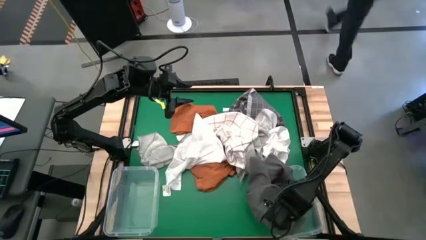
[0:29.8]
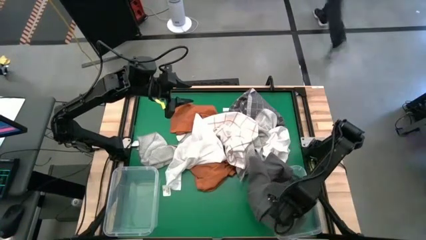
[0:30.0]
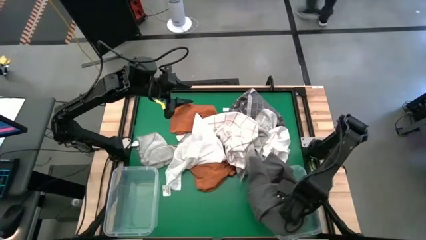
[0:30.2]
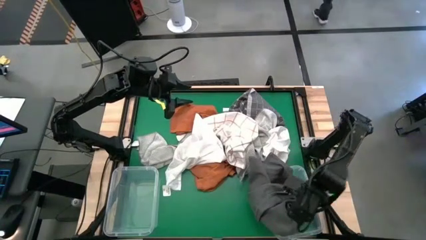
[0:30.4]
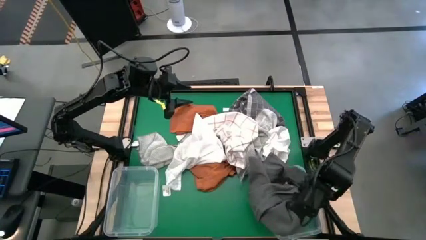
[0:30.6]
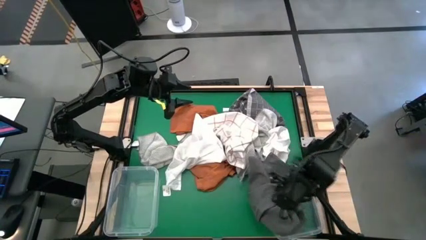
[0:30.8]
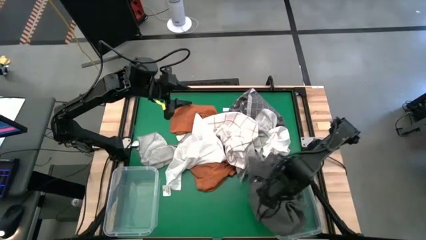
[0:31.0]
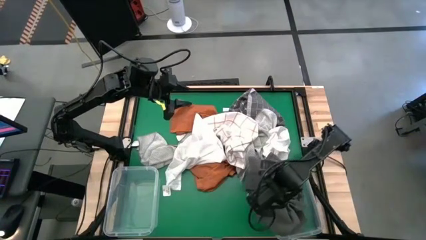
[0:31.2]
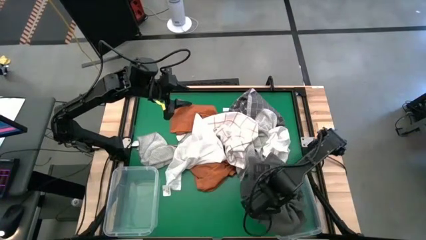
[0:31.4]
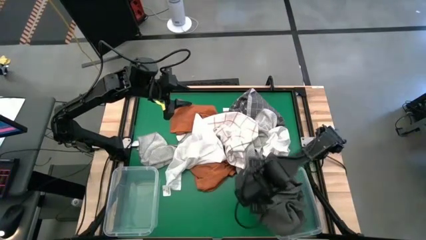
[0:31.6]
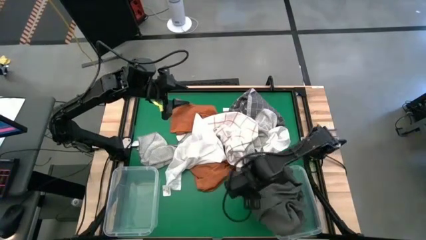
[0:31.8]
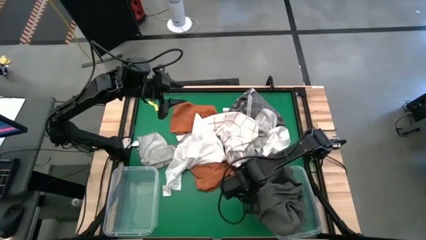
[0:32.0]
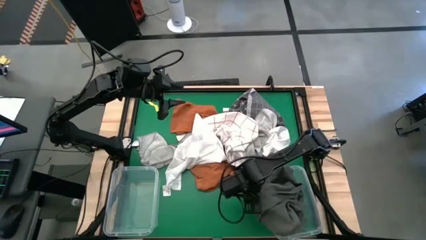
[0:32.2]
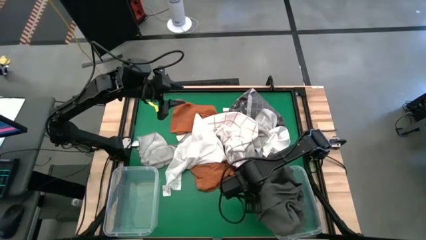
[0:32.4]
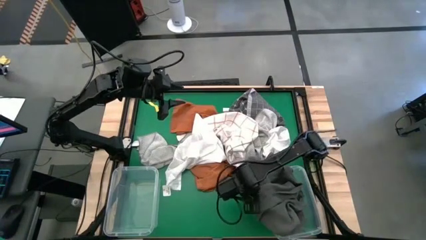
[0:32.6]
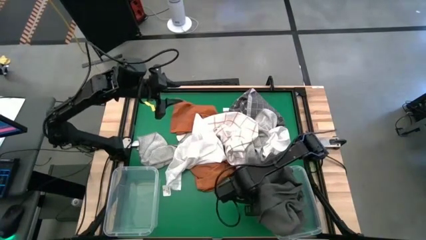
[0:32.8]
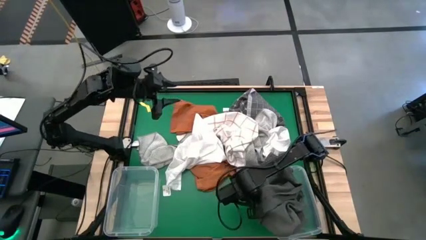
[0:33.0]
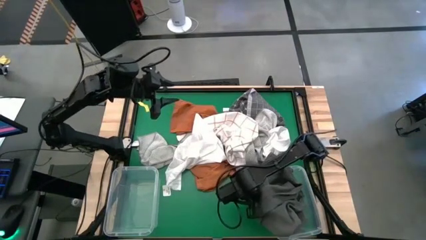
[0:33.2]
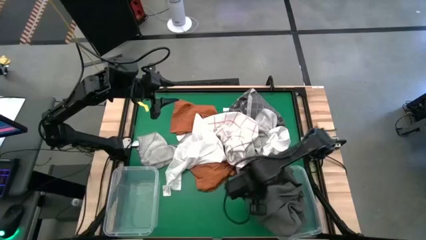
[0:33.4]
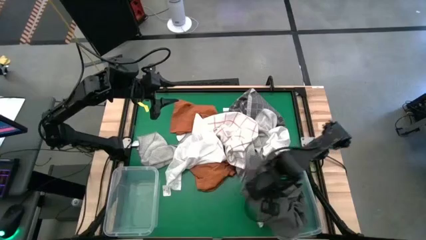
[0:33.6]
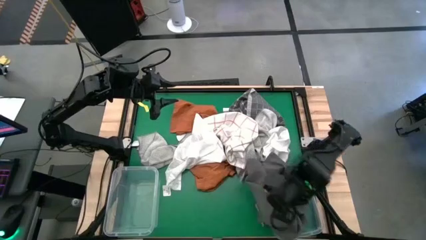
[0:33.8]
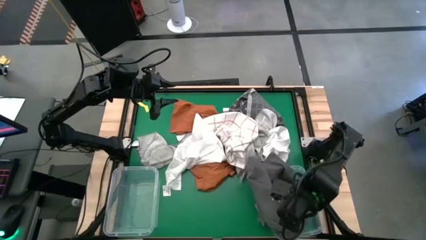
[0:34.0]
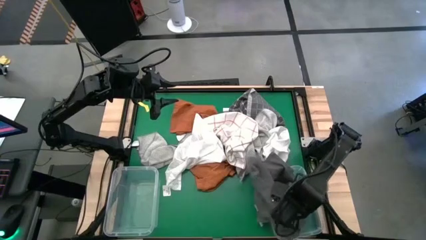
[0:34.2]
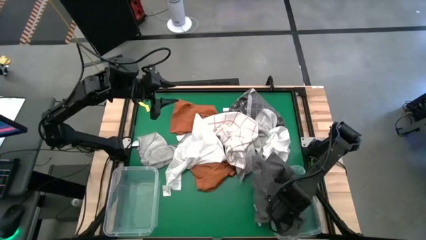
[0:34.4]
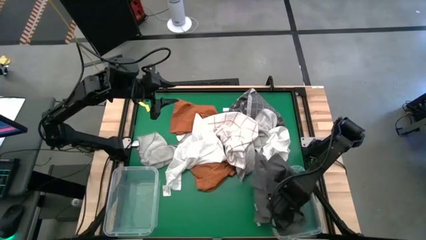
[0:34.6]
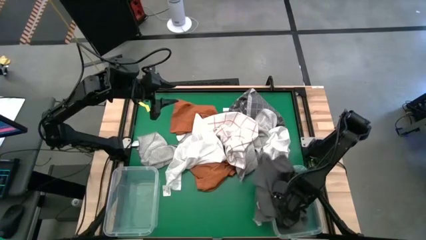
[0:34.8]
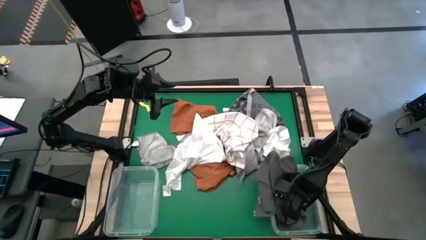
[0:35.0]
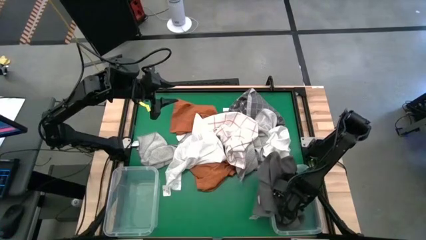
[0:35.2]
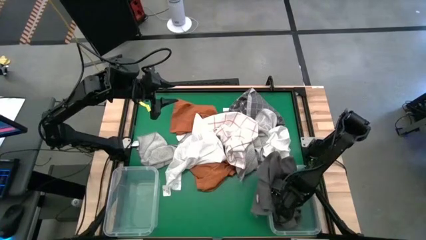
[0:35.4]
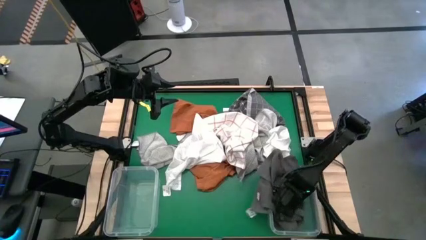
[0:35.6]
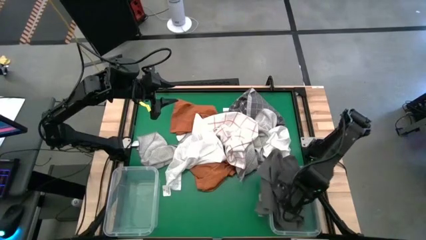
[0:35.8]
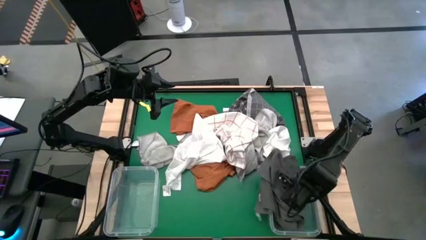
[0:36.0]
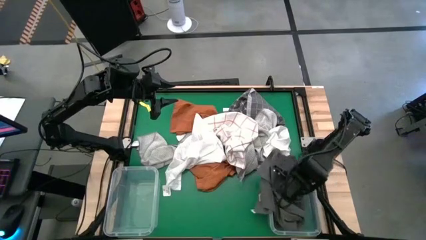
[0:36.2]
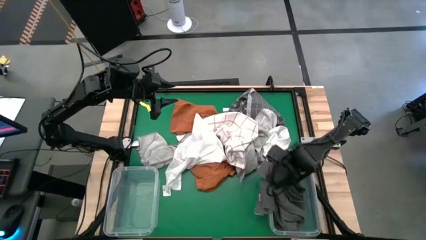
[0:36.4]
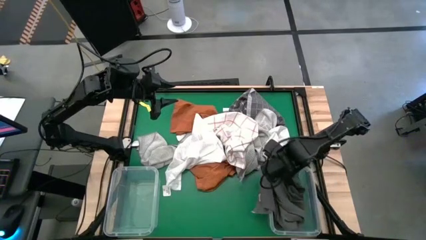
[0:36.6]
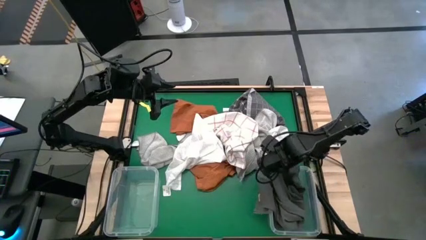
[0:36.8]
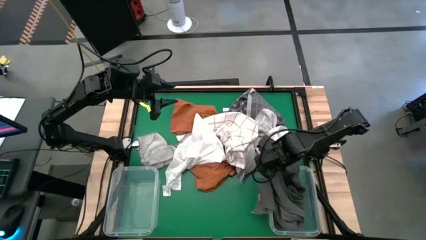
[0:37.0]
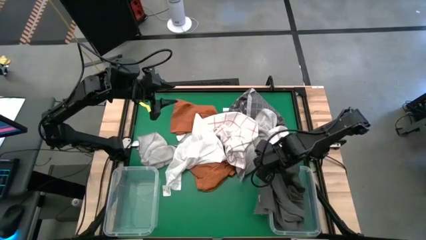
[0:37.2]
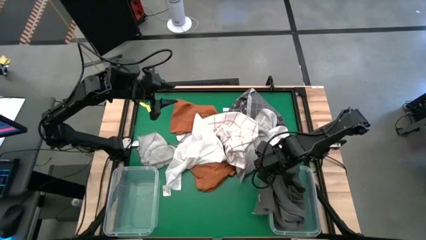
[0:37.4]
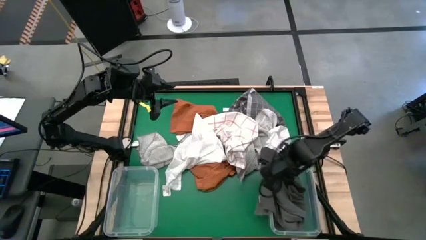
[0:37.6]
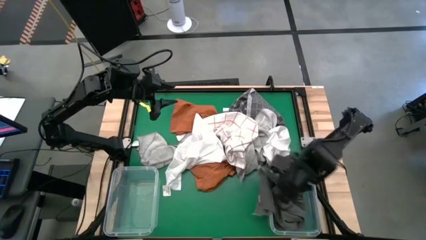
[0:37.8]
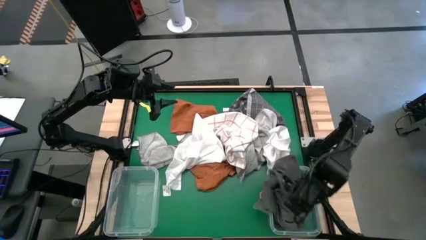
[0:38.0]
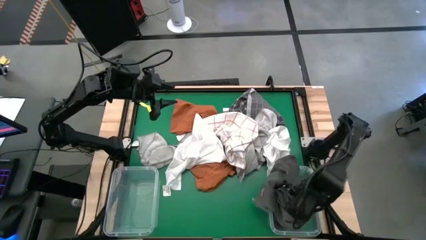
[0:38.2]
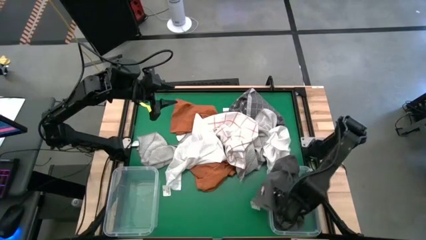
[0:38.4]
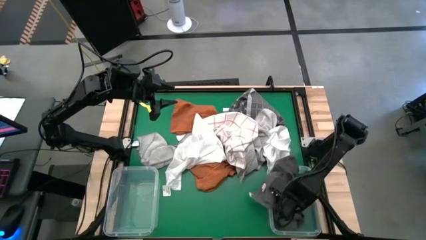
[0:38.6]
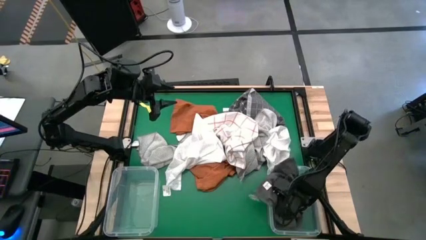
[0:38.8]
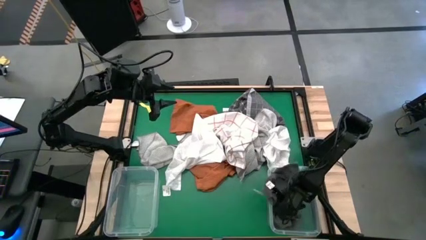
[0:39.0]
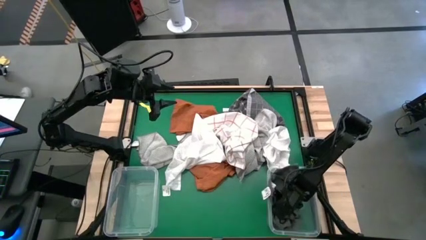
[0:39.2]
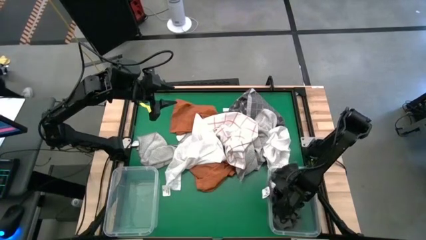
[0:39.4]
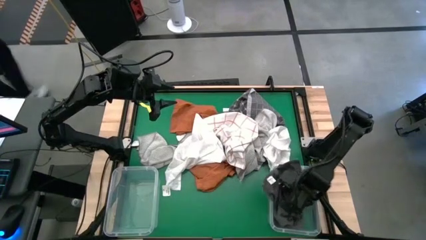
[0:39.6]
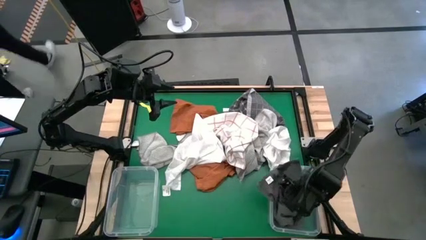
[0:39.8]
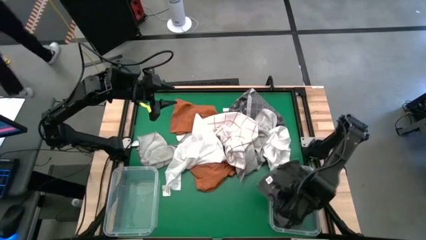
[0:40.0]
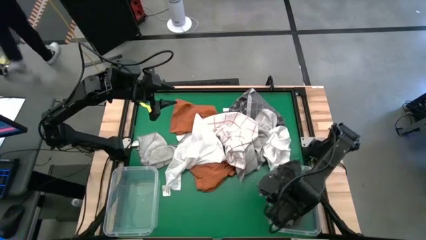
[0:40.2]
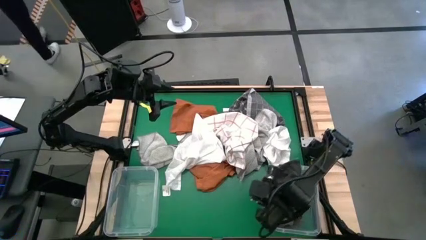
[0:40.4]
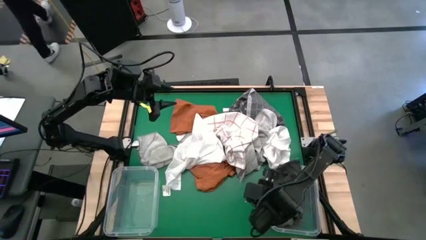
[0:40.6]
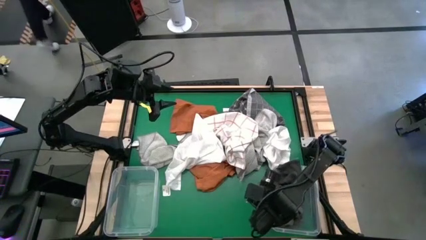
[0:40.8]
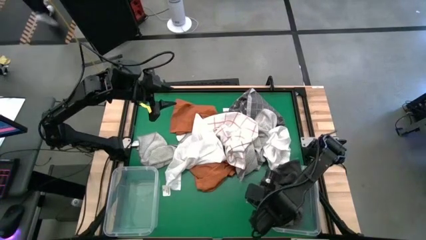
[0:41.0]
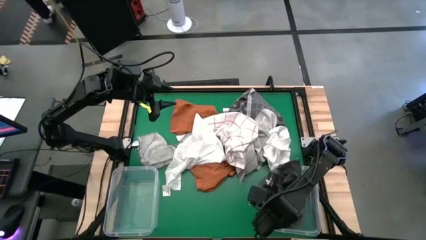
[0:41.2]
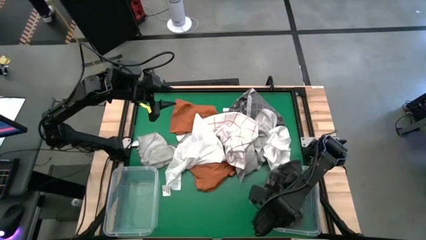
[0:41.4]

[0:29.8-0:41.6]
Task: Sort towels by color in basket
Put the gray towel into the right transparent bin

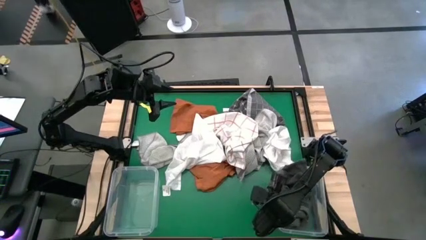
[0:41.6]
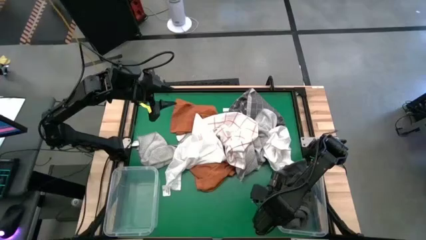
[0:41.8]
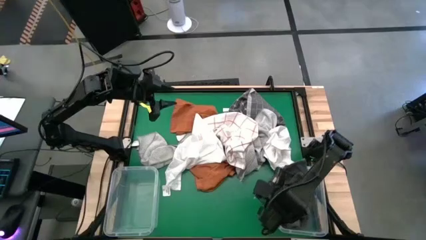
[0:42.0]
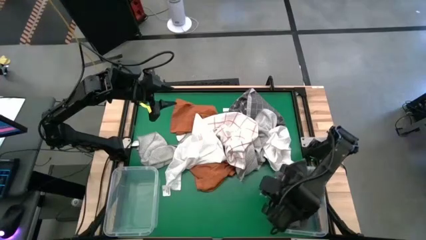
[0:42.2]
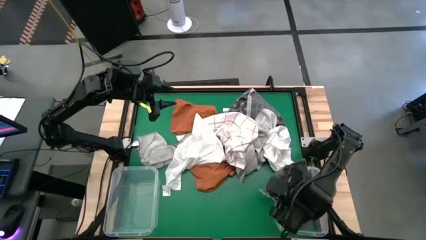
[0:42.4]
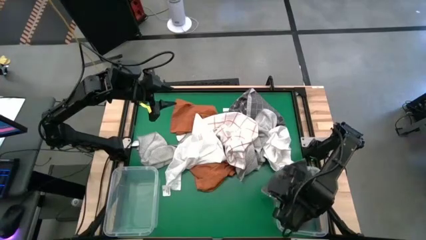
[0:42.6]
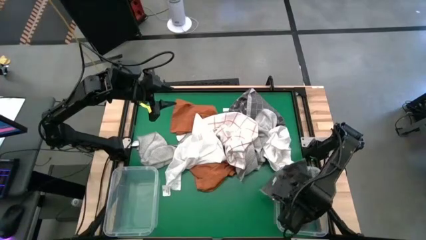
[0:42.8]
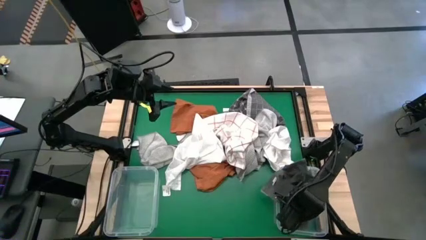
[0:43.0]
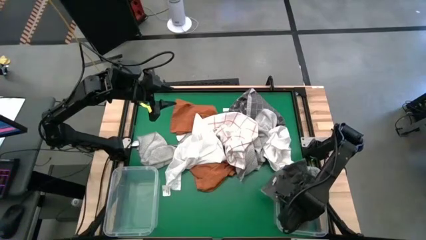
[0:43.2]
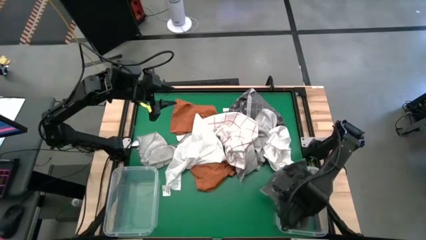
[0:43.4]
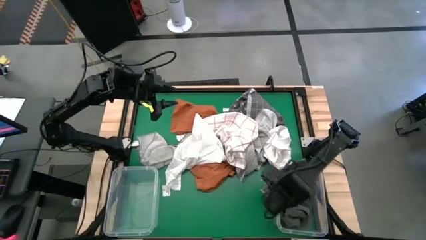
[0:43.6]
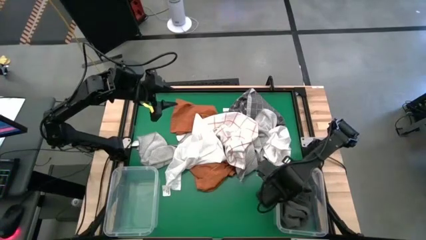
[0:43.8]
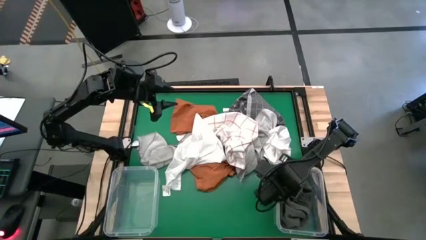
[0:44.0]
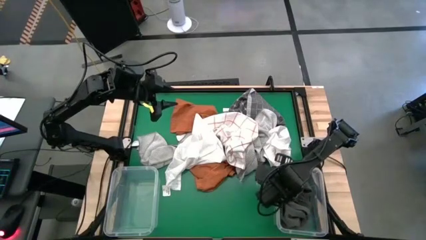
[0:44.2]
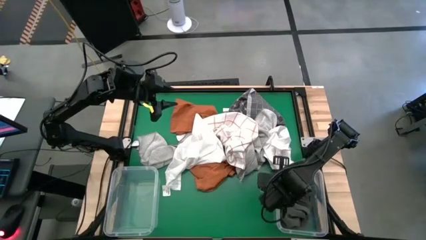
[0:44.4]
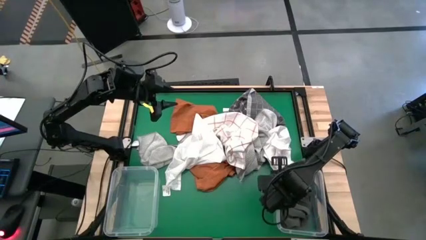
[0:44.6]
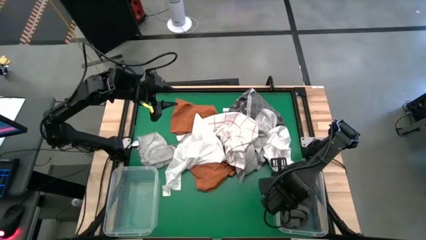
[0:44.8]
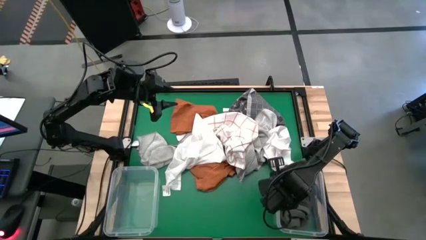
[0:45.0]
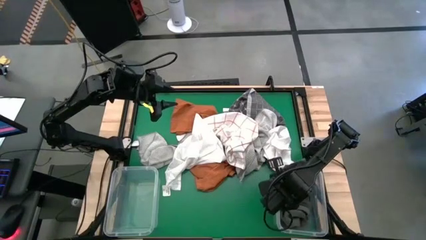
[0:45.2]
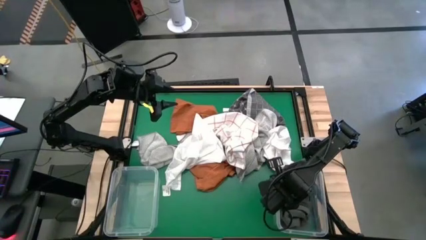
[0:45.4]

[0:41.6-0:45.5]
Put the gray towel into the right transparent bin
